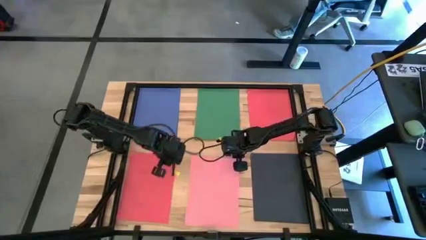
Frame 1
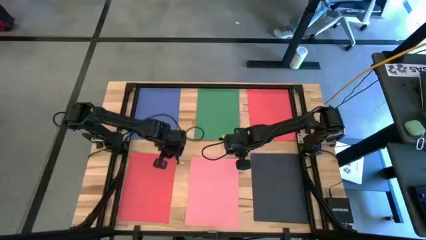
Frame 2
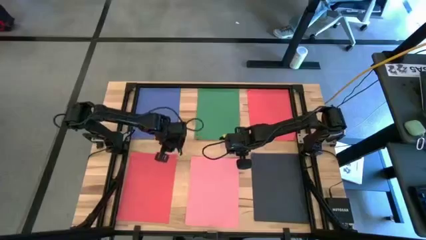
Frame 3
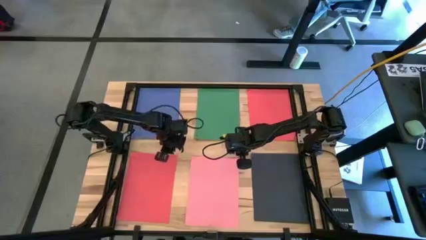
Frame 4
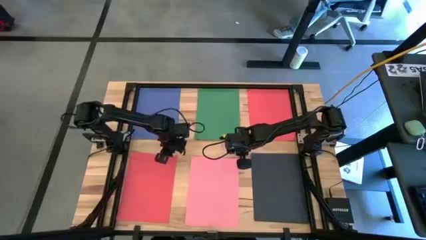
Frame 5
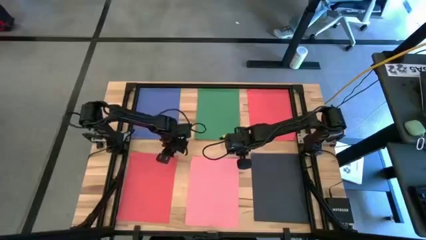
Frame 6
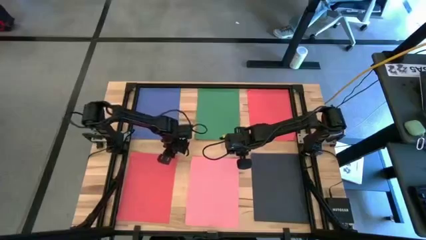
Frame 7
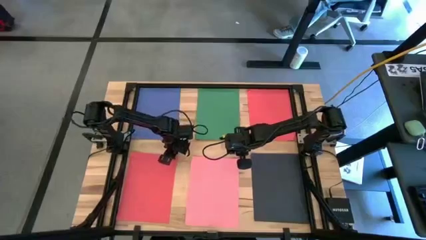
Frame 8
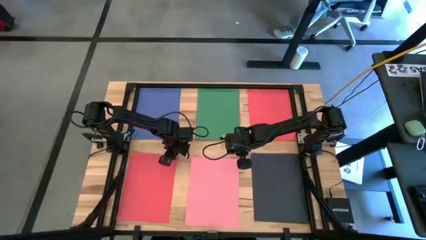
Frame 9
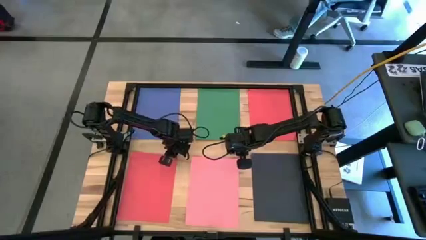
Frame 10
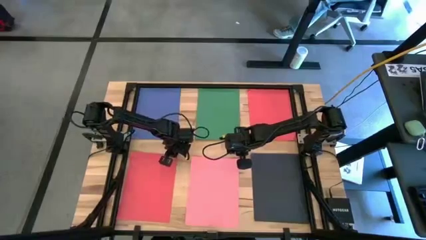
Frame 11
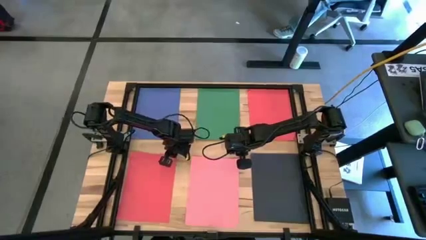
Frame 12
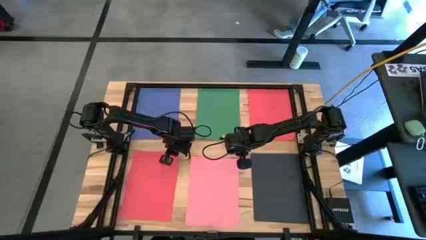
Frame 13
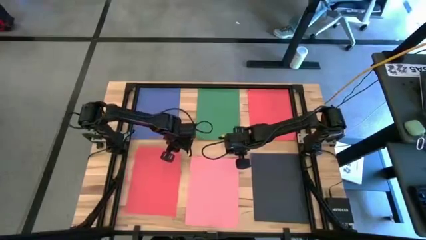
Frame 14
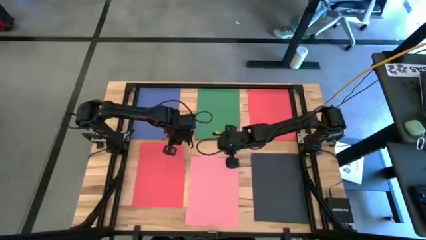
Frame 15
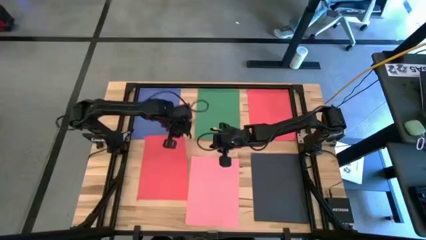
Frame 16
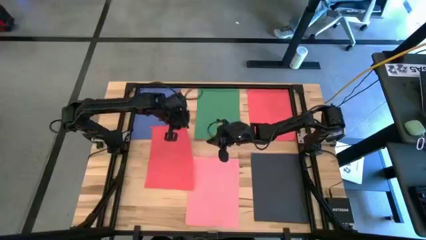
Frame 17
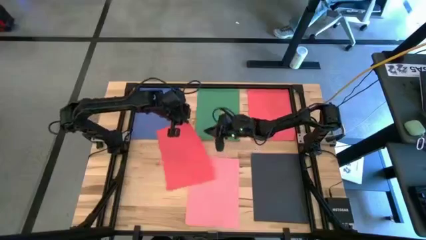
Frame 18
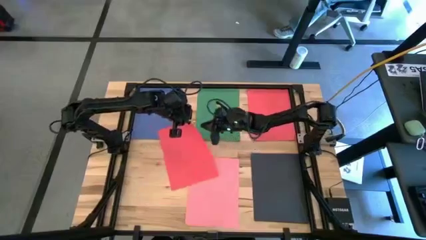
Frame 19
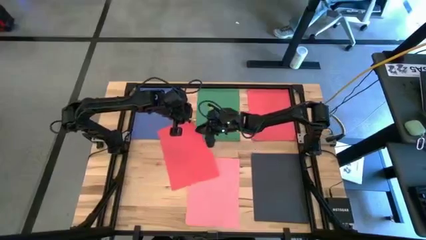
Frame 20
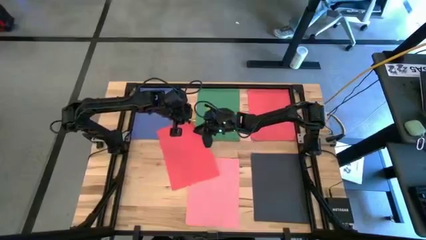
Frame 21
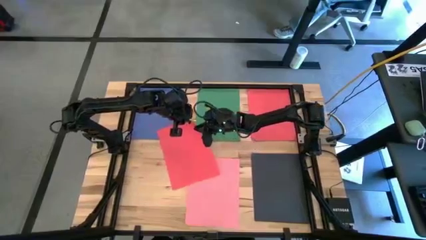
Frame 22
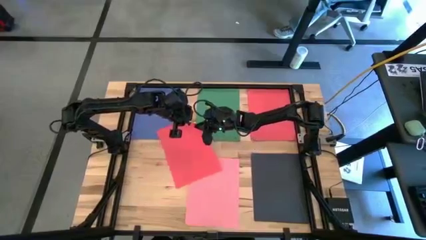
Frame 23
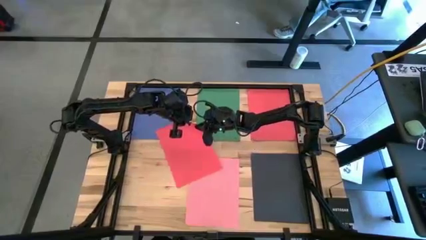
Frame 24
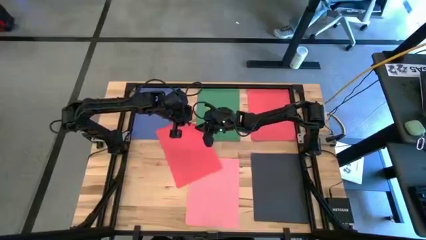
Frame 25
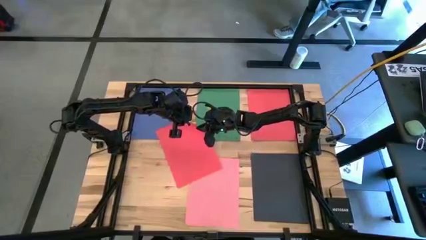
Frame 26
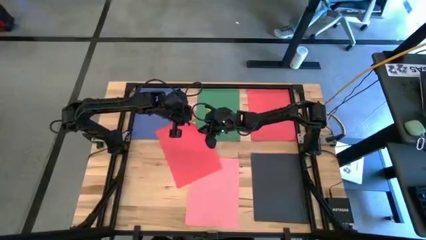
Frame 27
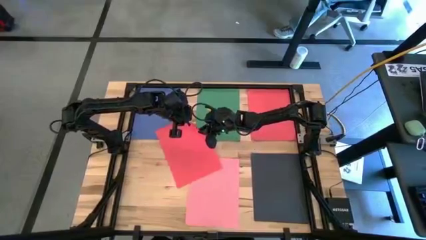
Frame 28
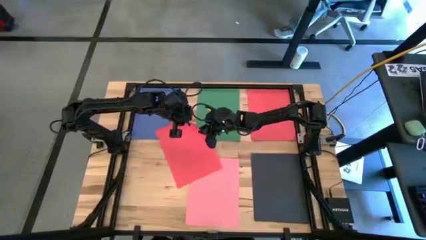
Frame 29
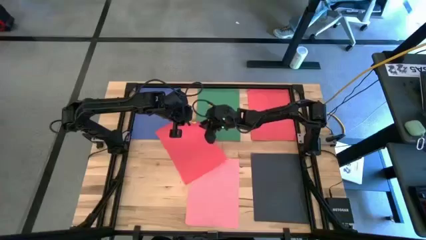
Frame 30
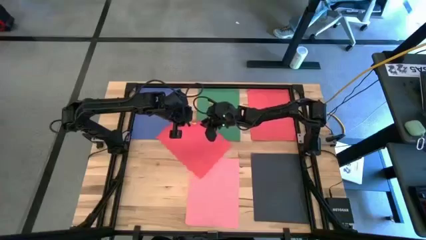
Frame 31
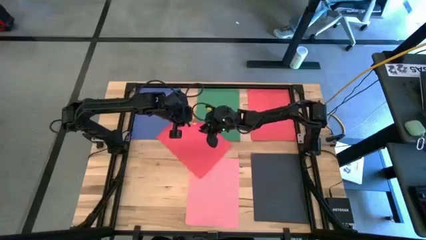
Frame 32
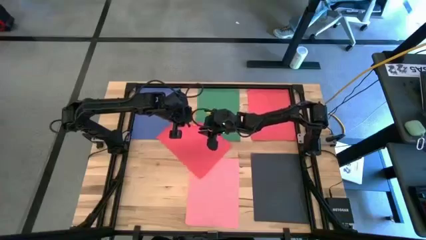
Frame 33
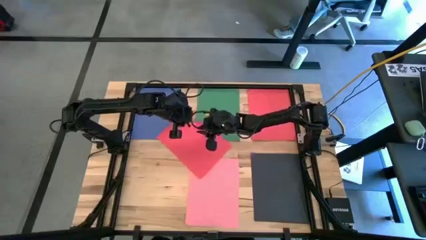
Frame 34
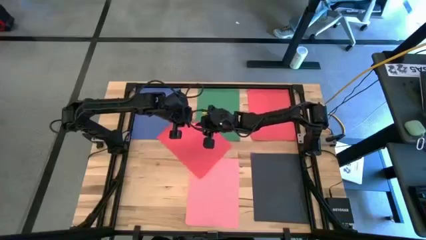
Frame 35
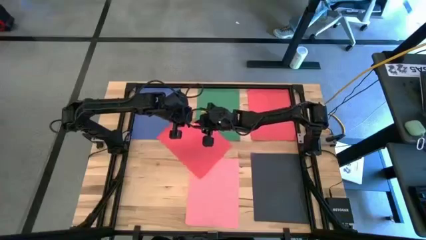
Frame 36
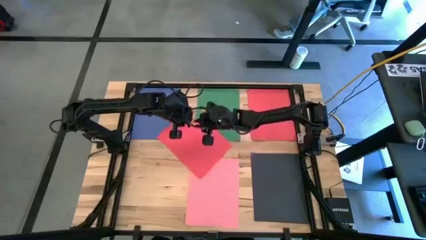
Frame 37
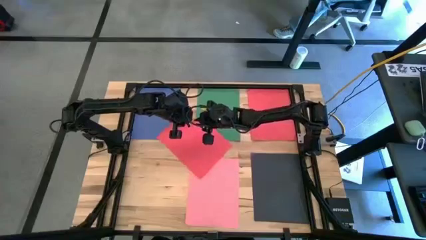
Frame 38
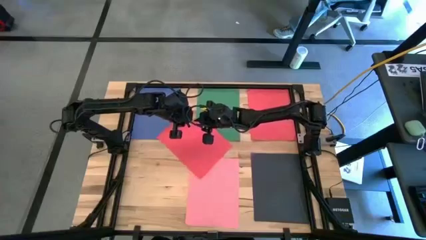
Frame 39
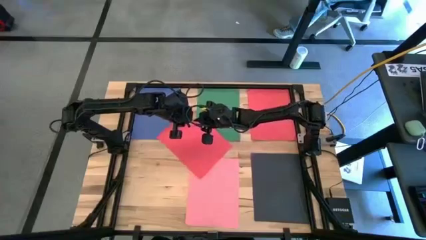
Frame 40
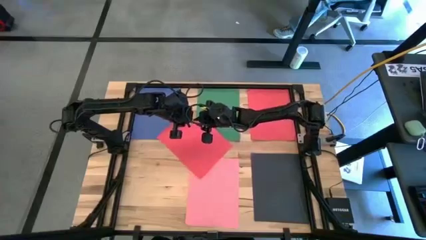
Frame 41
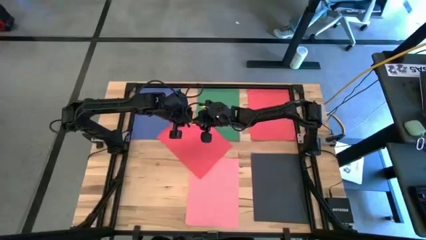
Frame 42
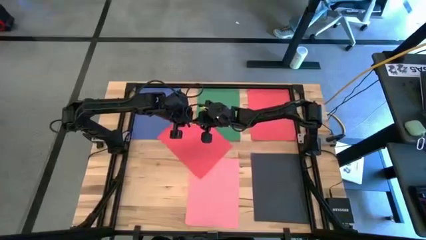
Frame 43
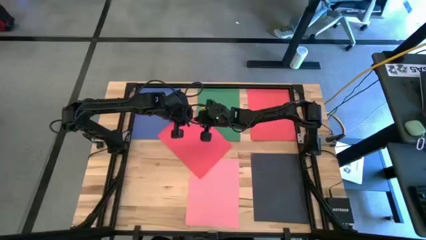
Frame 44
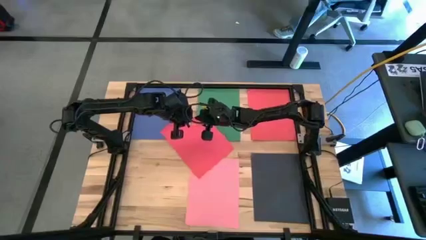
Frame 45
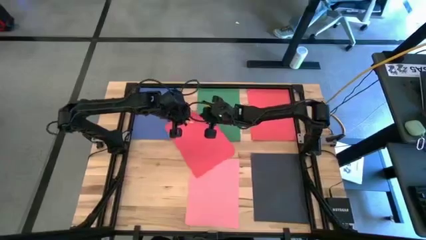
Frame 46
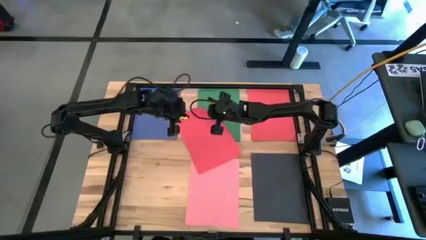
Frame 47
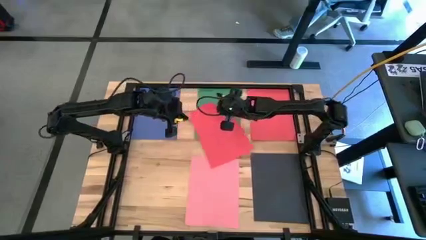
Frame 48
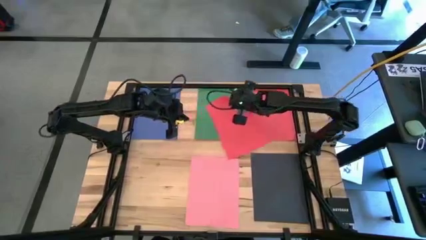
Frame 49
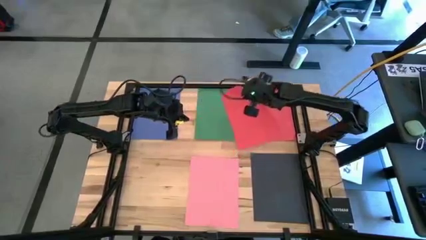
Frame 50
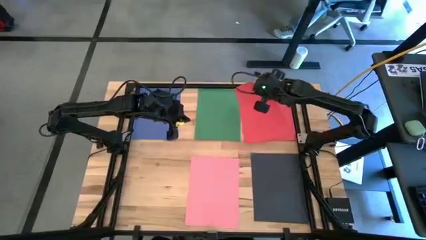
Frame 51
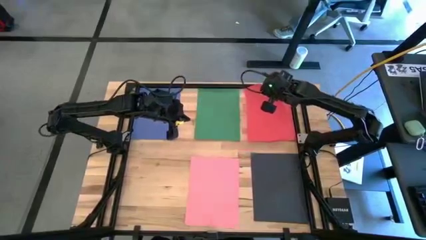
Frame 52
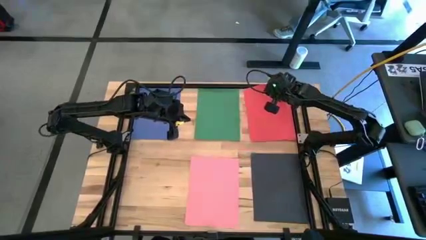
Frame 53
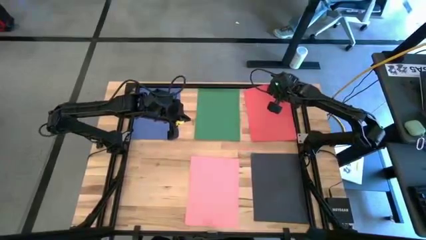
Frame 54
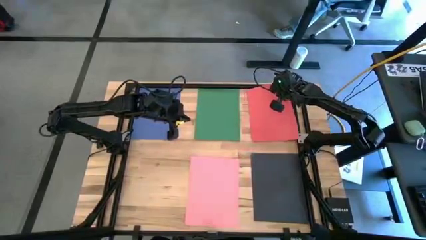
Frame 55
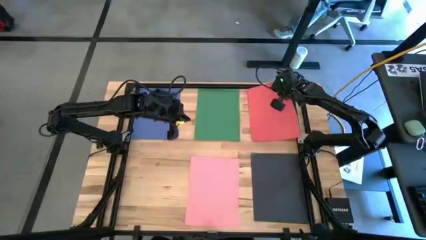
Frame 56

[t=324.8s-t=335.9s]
Task: Organize paper
Stack the red paper on top of the other red paper

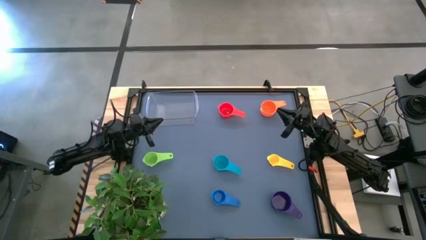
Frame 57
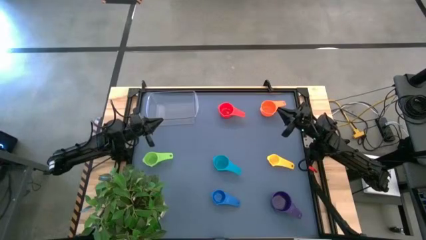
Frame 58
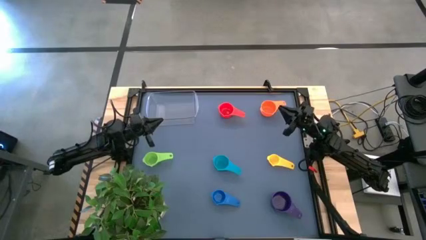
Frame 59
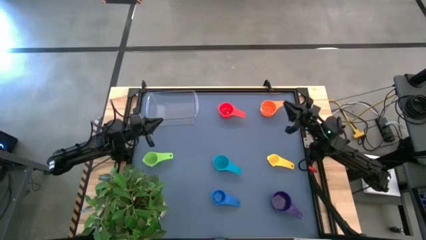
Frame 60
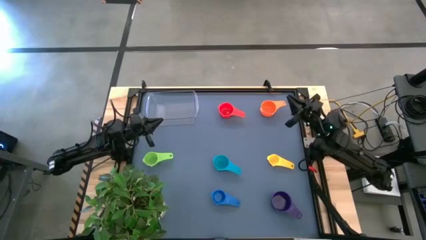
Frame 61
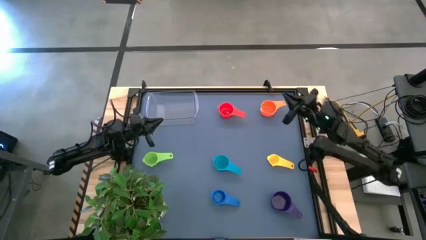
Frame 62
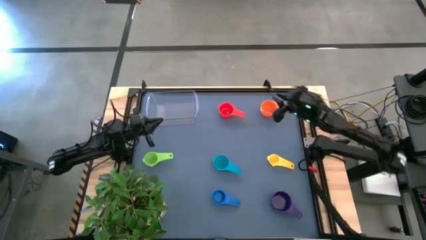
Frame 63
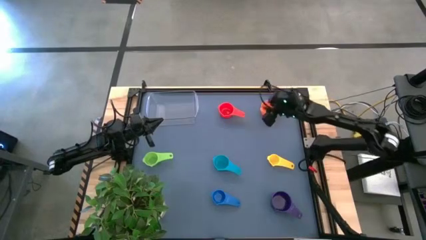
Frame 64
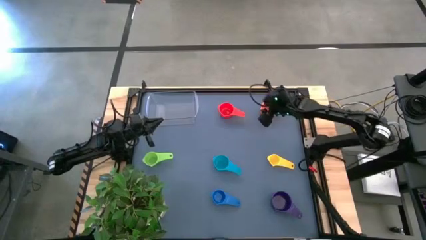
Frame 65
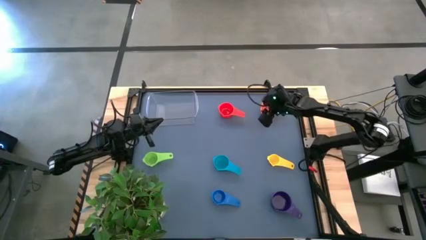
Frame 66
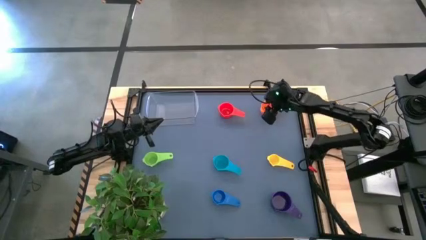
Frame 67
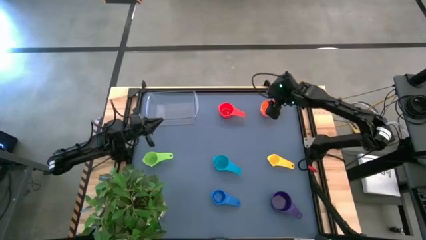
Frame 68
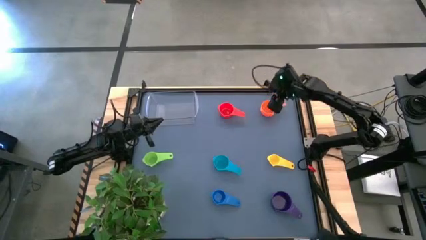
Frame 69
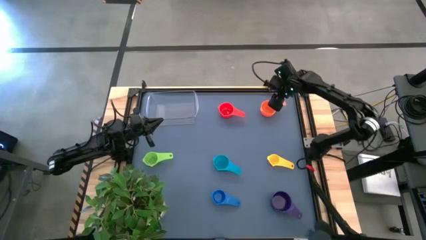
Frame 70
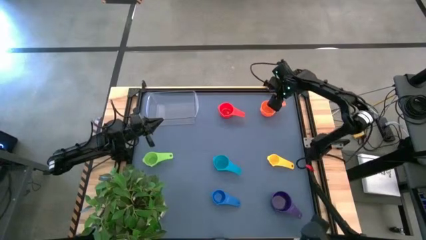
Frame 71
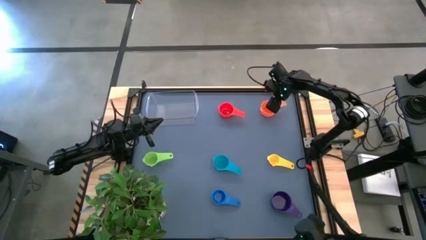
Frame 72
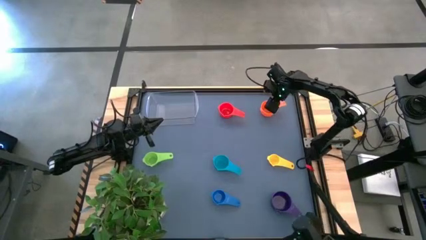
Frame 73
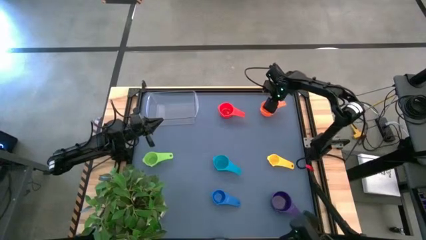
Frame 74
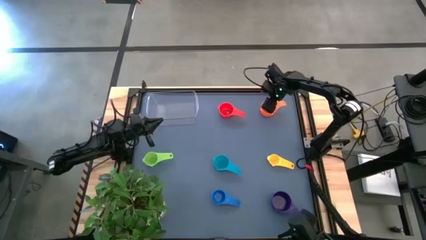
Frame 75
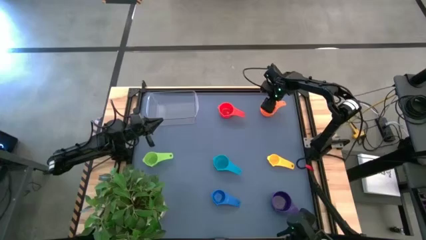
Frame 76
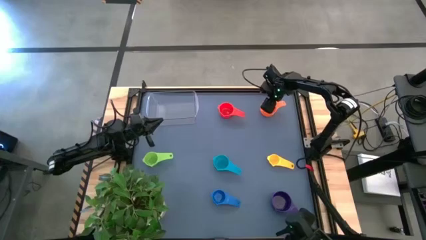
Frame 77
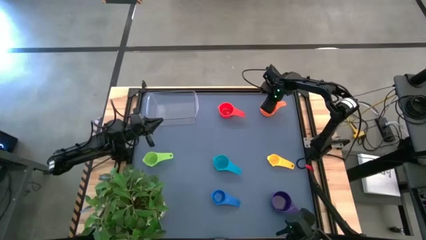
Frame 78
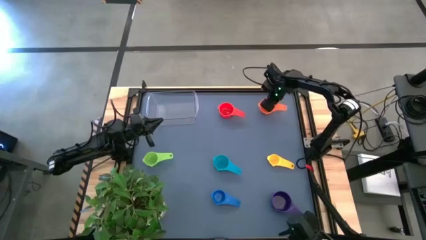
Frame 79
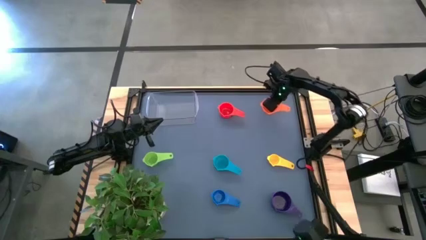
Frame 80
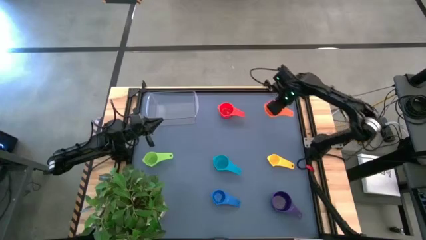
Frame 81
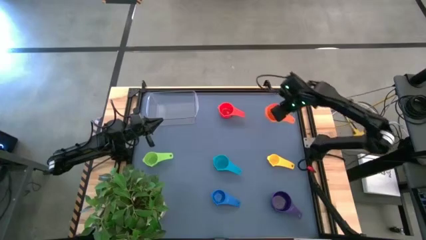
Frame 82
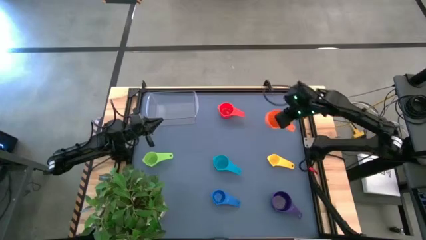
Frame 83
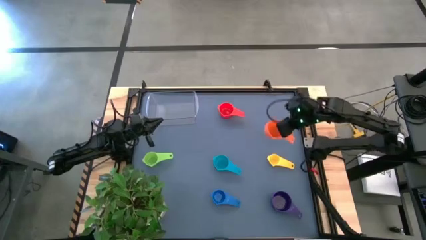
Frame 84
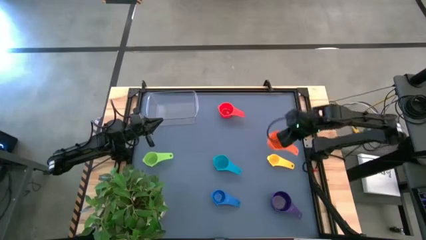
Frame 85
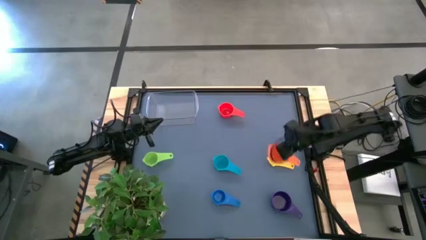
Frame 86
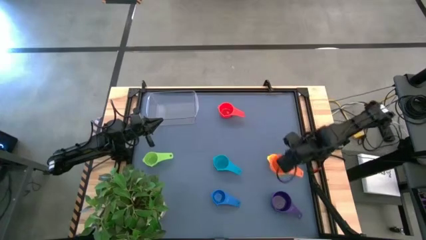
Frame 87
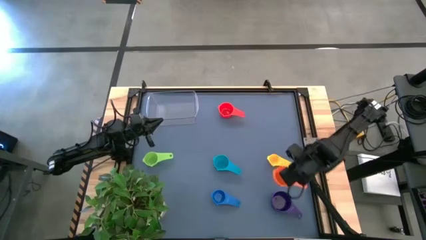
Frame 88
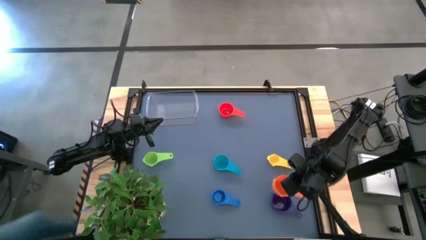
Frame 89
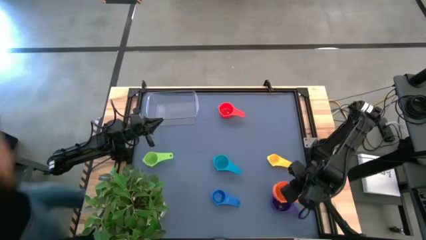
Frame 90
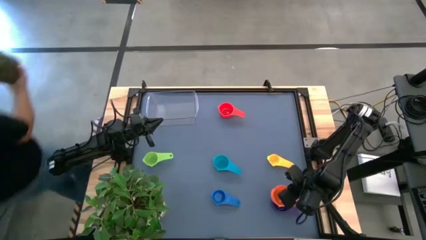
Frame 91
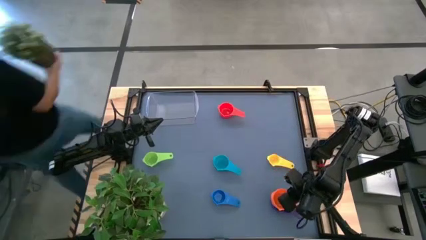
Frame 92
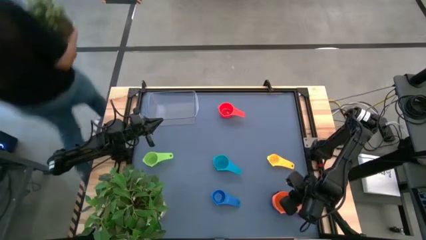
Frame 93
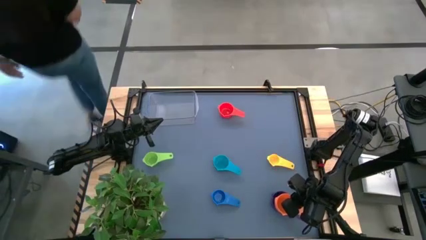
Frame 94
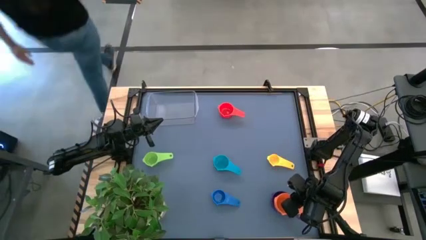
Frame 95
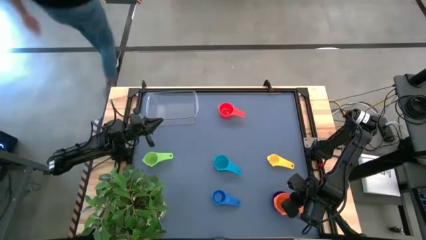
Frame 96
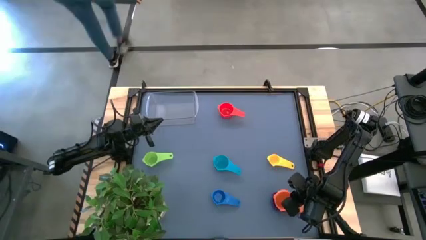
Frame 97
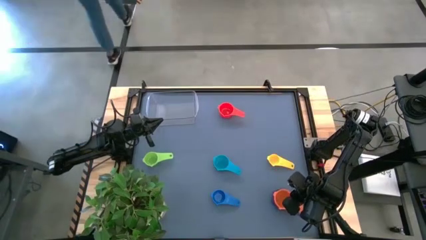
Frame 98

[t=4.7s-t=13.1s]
Task: Nest measuring cups in basket
Stack the orange measuring cup on top of the purple measuring cup
